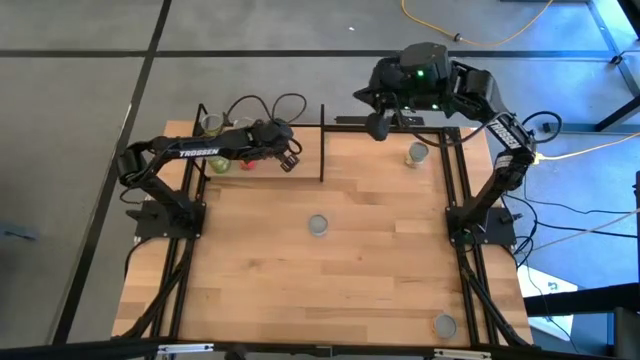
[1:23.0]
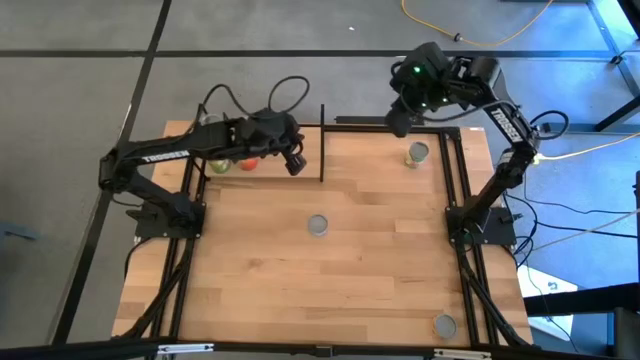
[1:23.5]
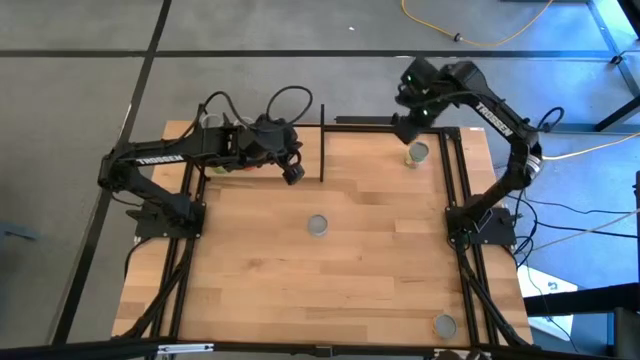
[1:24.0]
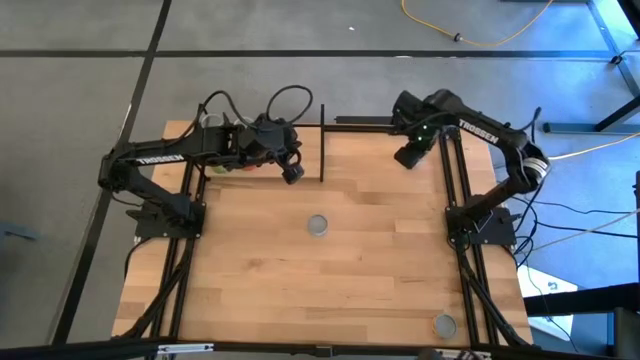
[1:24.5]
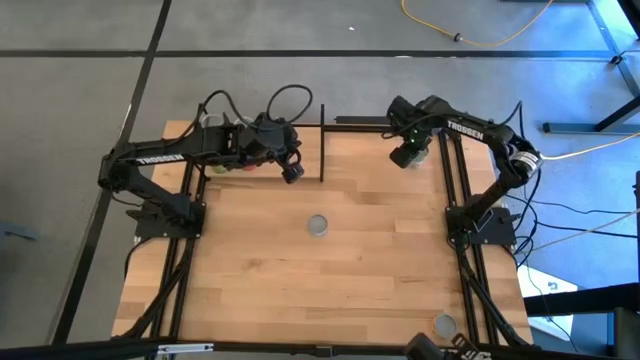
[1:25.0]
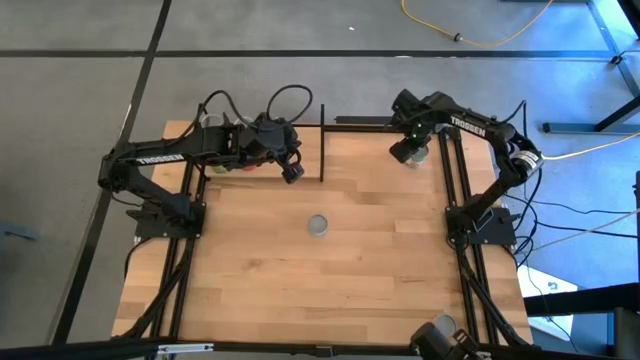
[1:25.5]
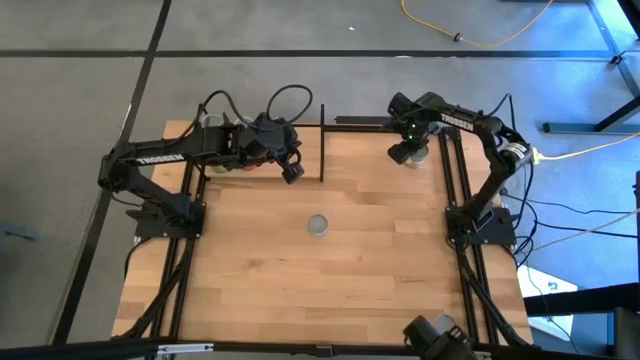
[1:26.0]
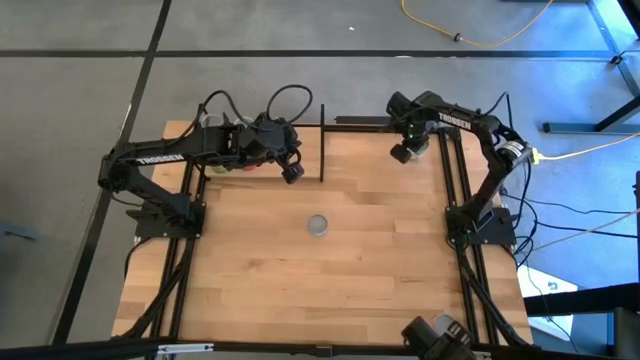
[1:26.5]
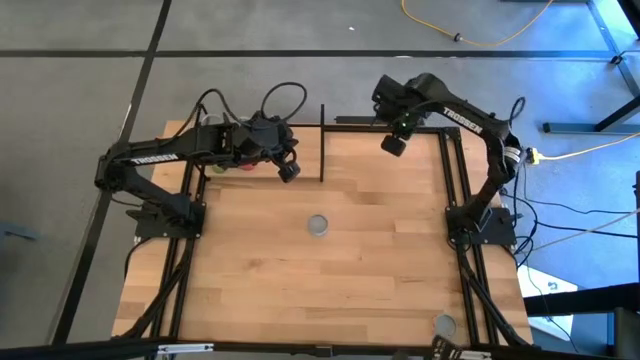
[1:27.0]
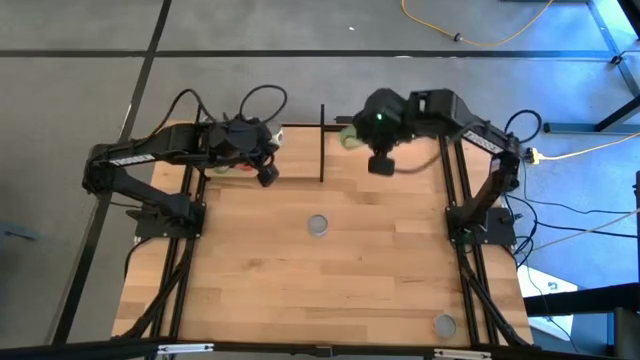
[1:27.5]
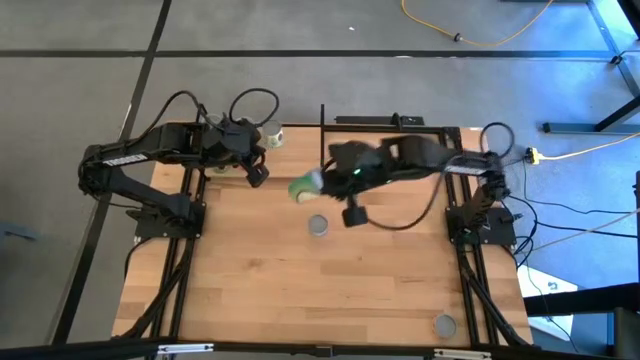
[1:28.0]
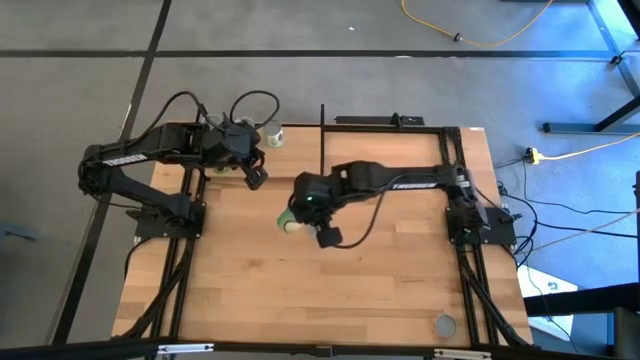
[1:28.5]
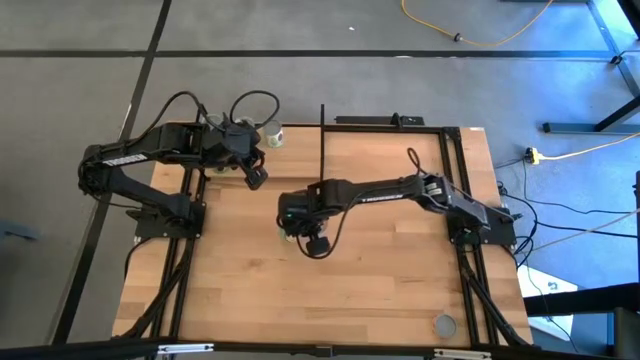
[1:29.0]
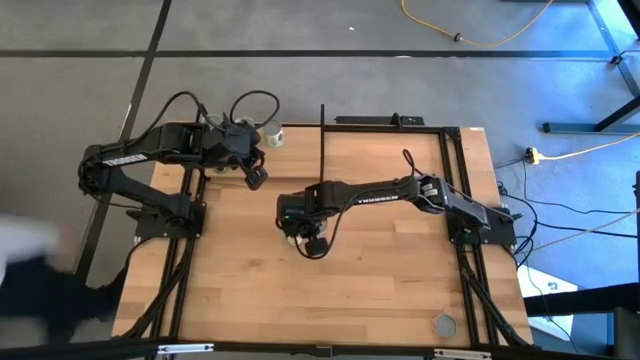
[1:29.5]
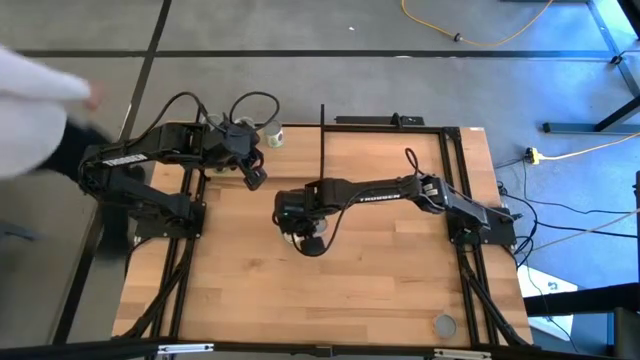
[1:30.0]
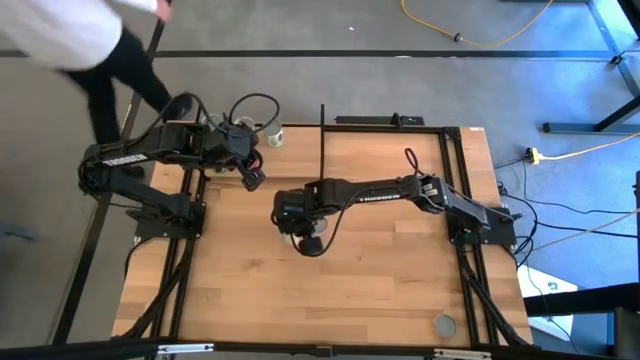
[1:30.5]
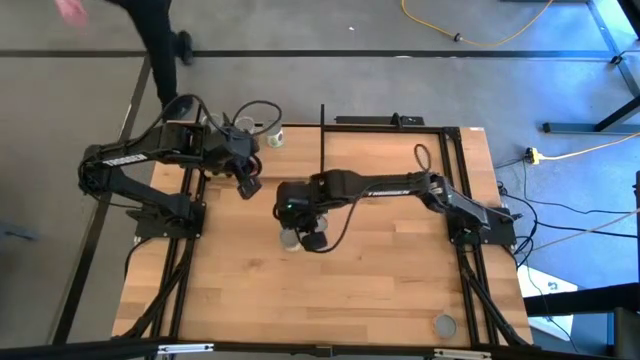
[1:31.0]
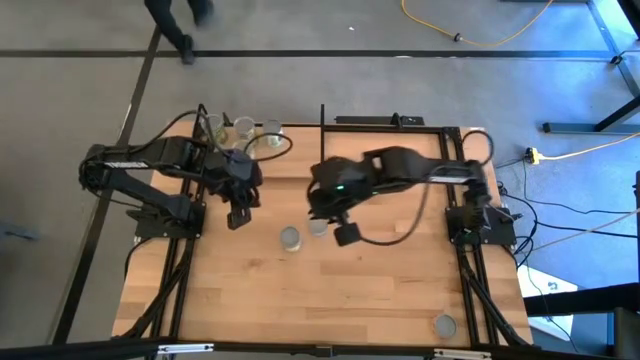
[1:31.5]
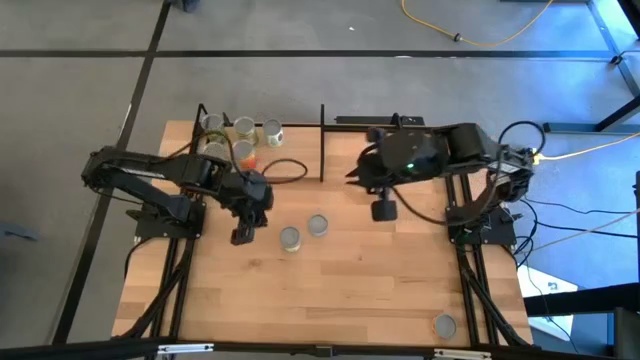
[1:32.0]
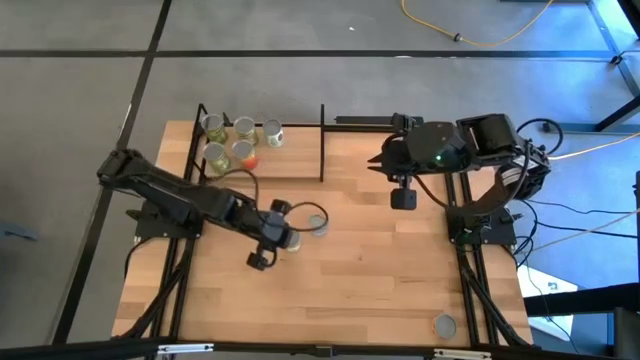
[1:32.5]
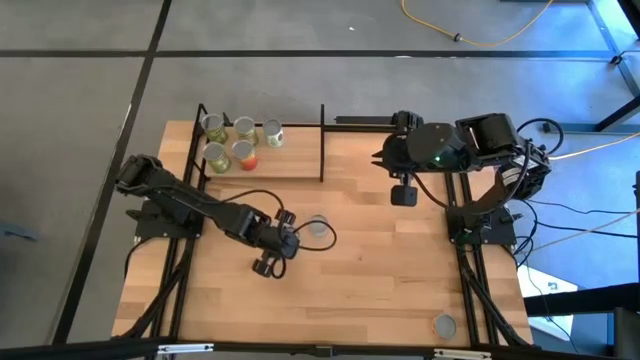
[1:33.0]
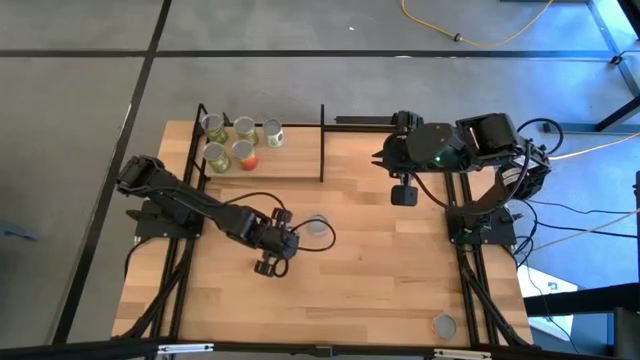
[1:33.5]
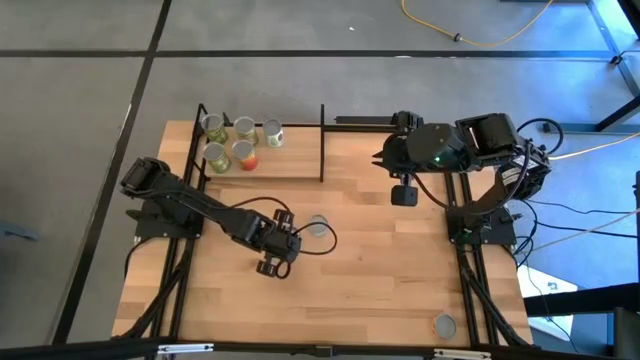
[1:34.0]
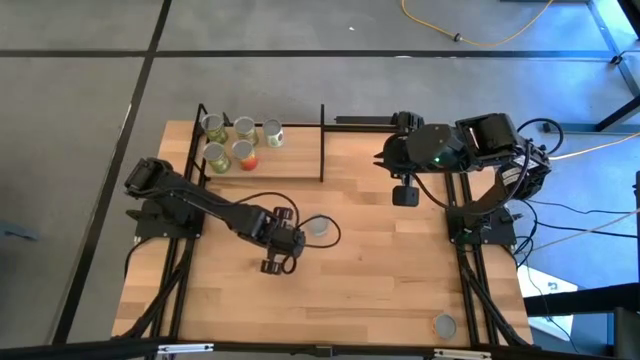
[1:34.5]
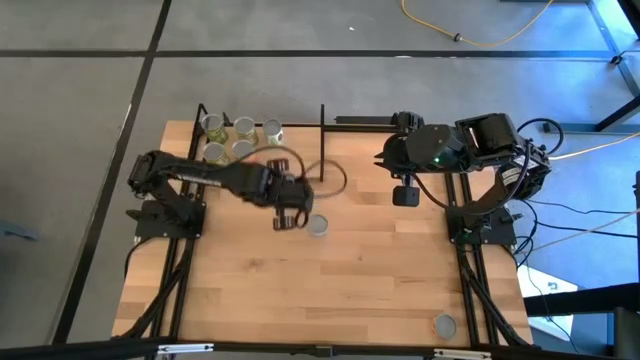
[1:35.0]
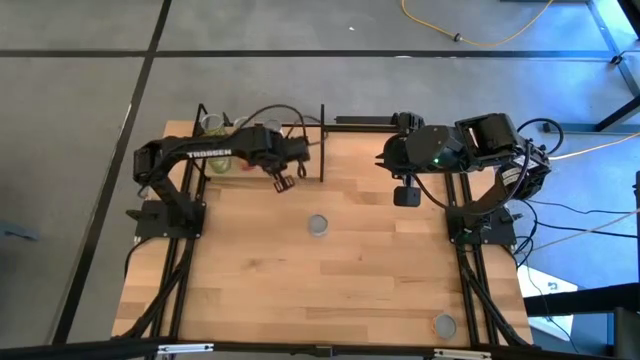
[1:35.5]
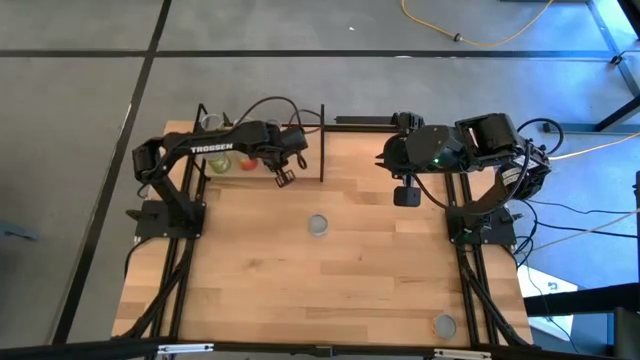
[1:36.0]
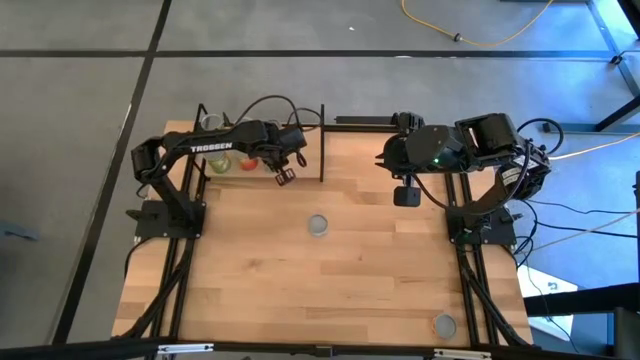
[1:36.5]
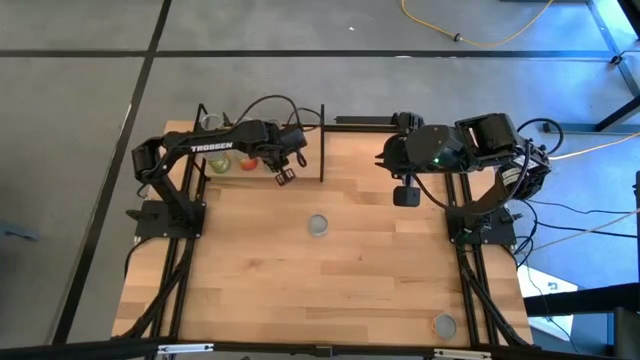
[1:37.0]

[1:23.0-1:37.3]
Task: Pick and place cans onto a shelf
Put the canned chicken soup on the shelf

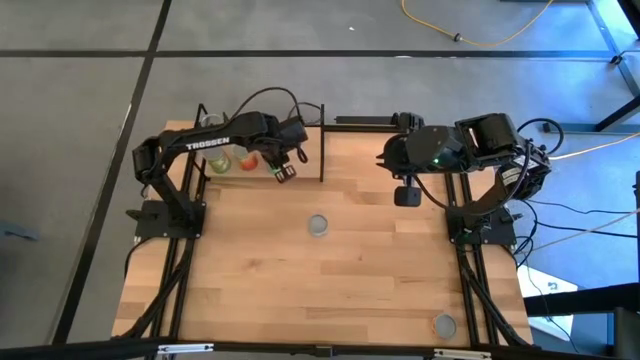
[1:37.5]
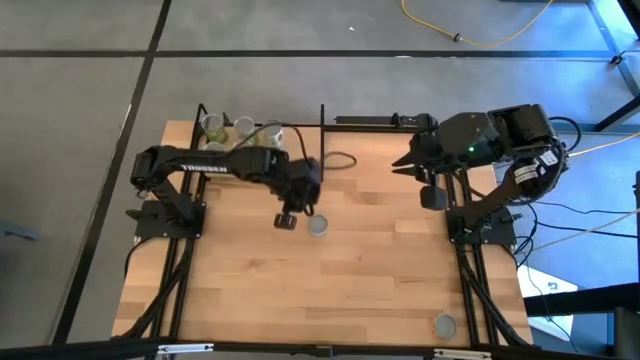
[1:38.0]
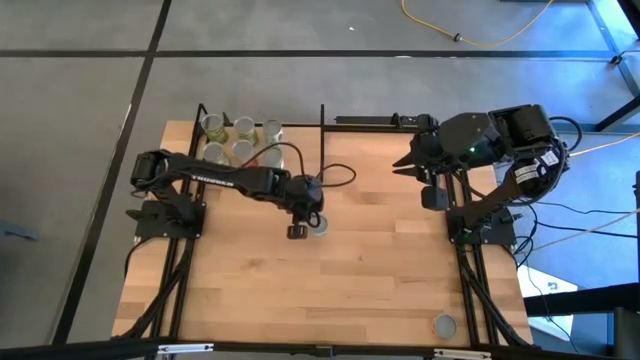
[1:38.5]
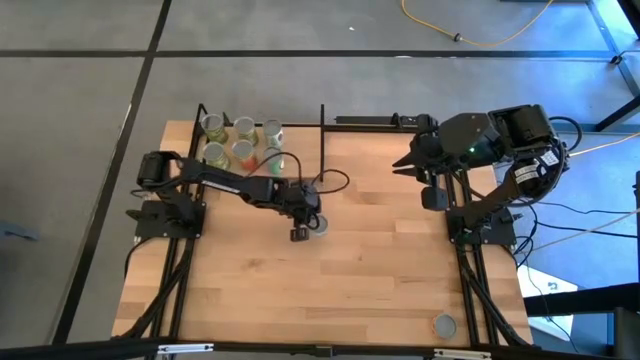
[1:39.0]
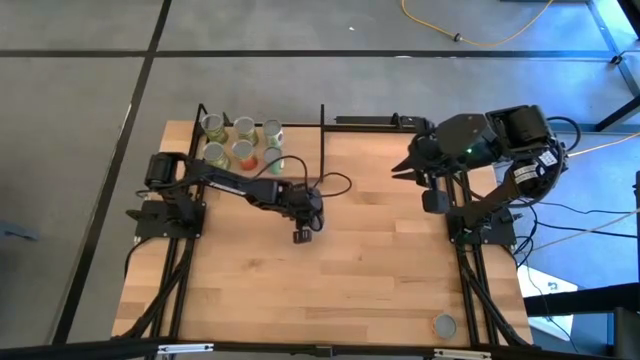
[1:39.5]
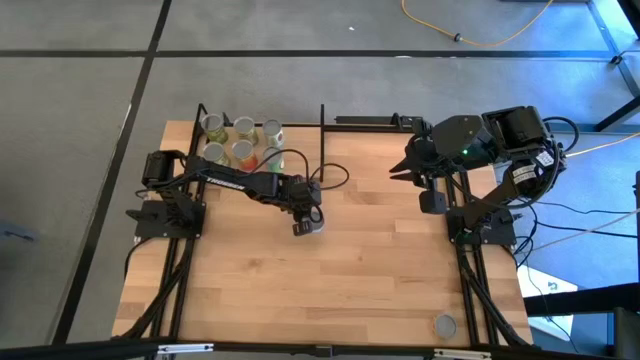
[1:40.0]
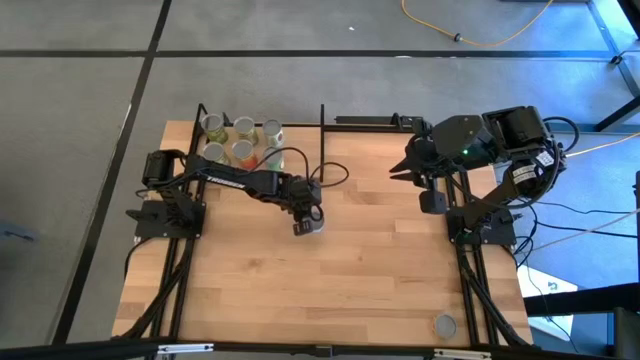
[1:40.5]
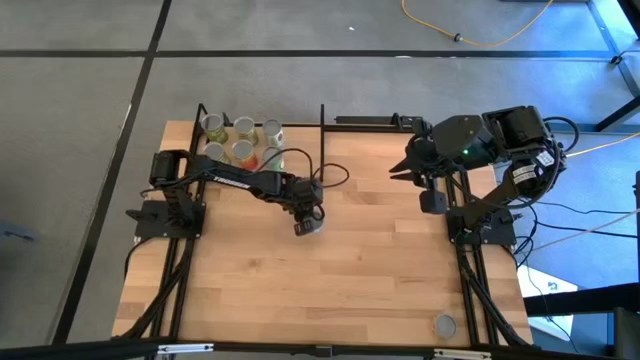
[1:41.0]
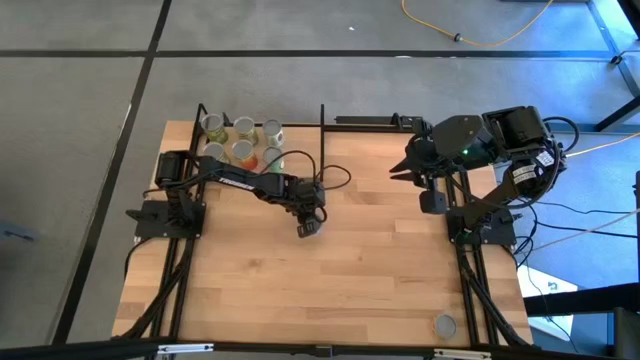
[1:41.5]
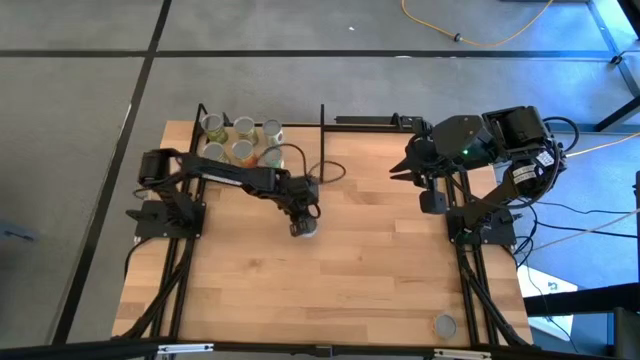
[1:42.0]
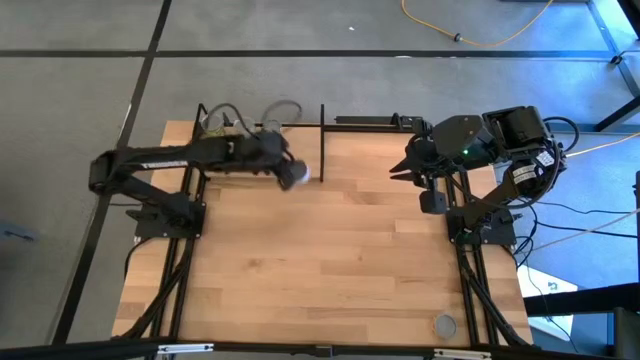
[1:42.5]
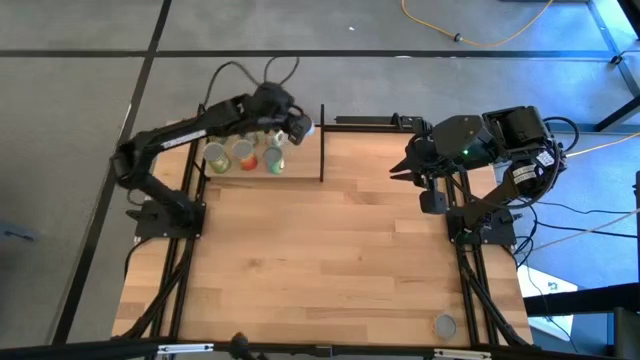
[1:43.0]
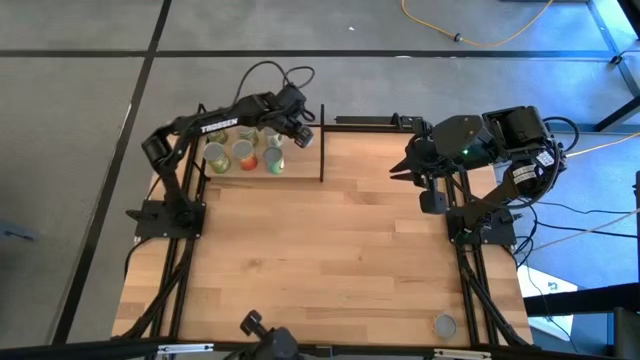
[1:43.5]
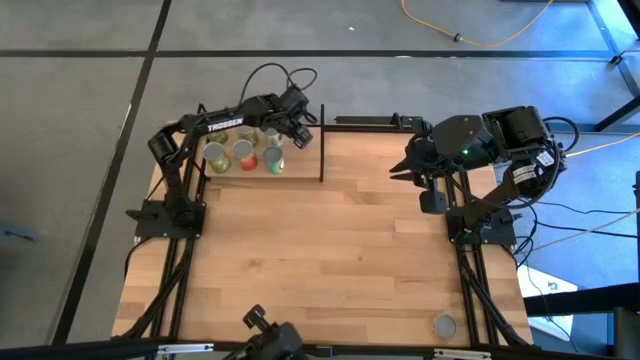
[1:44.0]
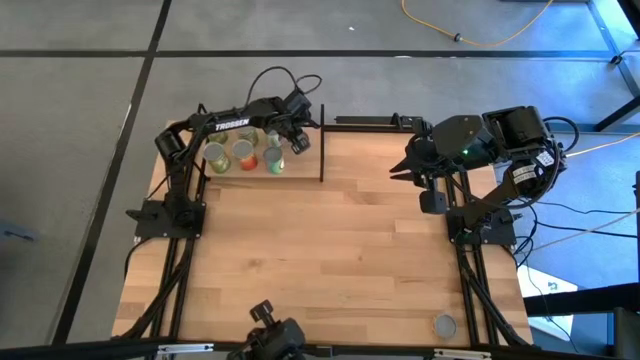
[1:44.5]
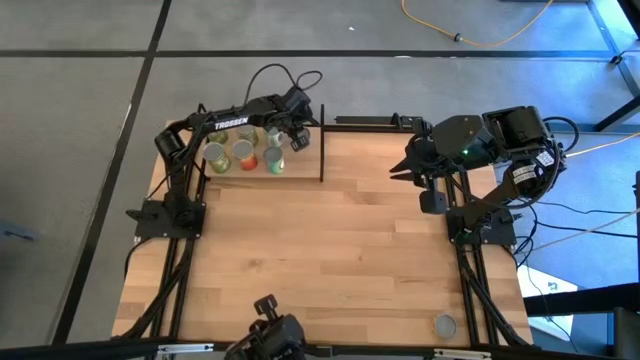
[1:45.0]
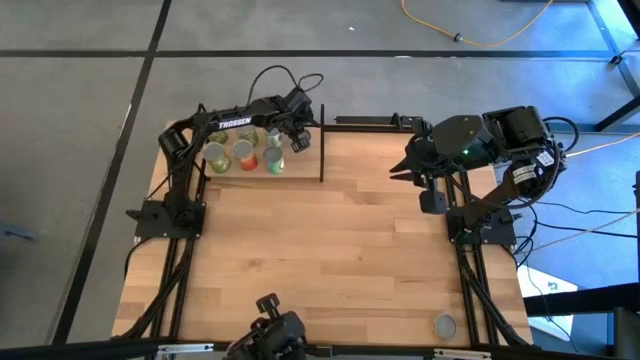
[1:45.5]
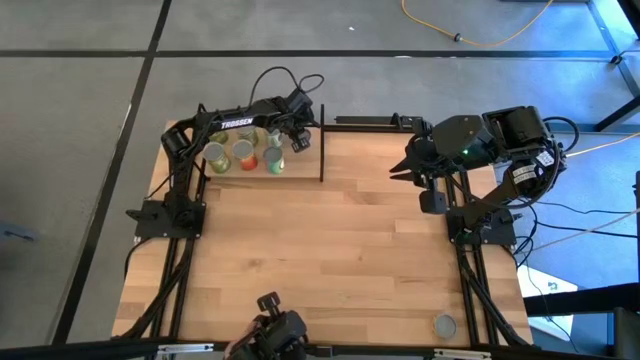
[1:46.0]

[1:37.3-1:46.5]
Put the canned salmon on the shelf
